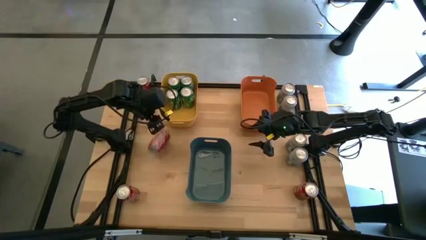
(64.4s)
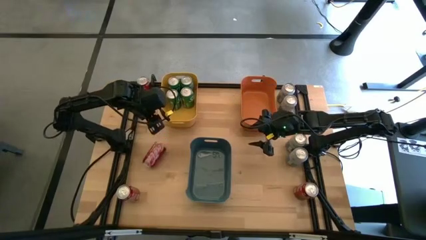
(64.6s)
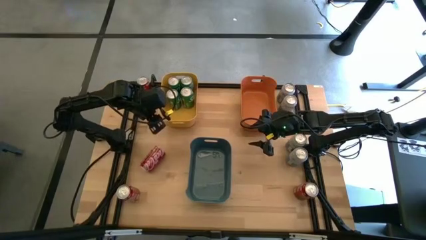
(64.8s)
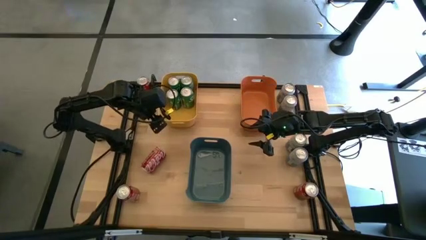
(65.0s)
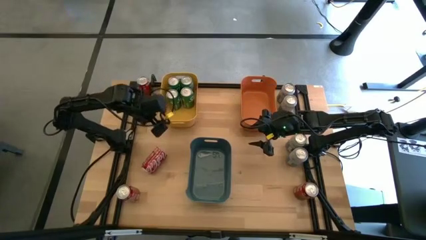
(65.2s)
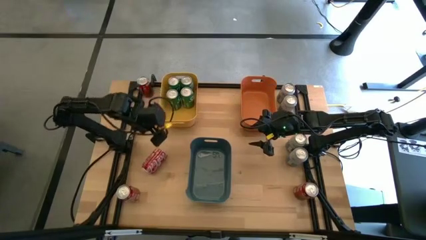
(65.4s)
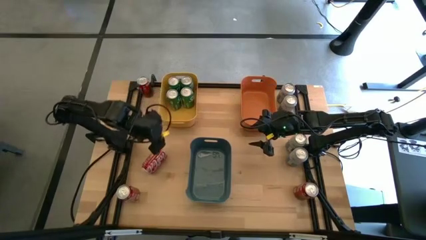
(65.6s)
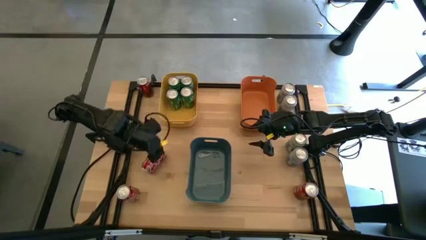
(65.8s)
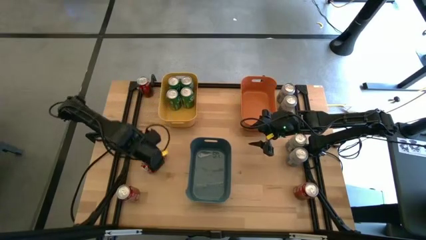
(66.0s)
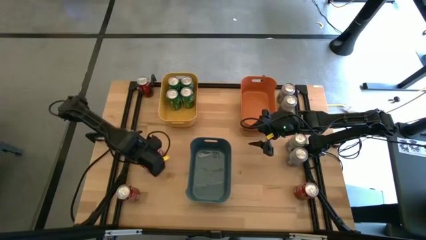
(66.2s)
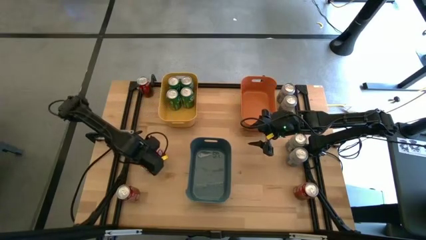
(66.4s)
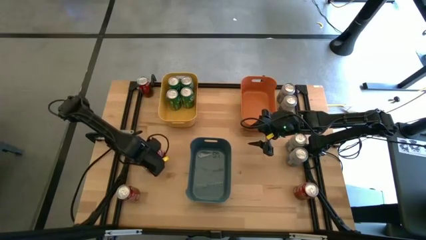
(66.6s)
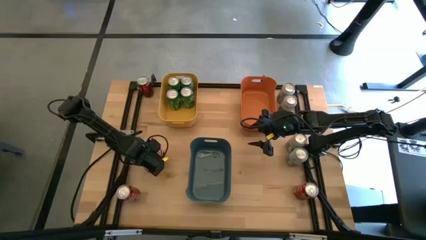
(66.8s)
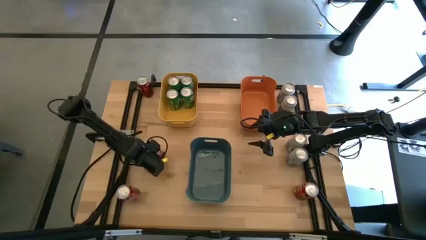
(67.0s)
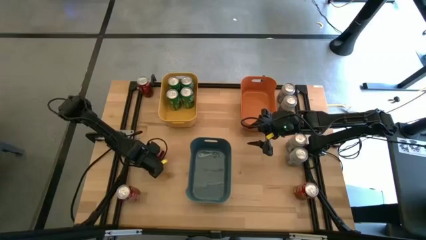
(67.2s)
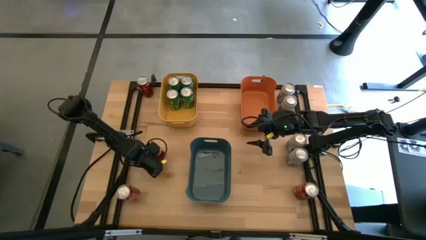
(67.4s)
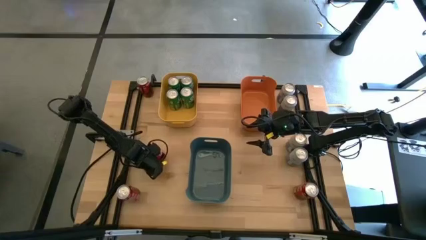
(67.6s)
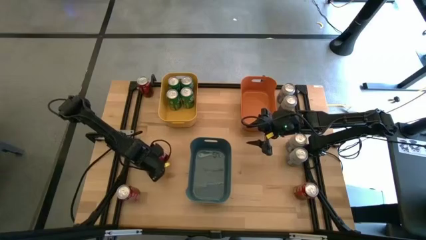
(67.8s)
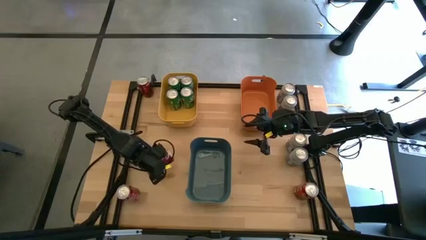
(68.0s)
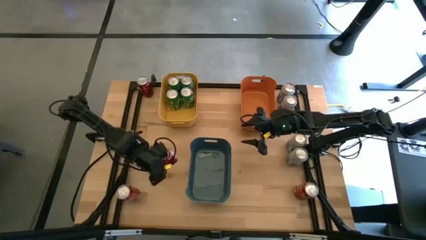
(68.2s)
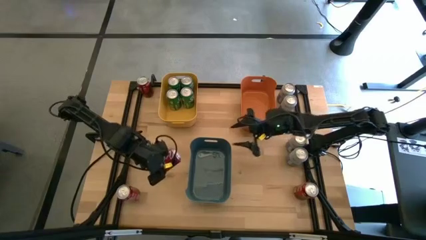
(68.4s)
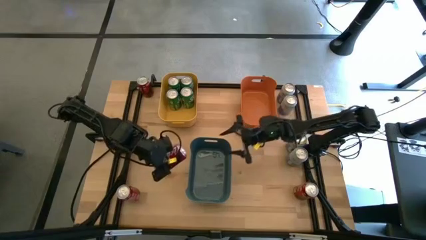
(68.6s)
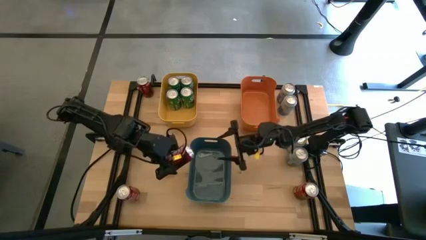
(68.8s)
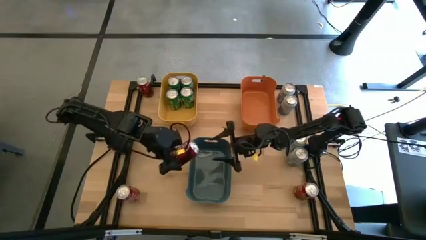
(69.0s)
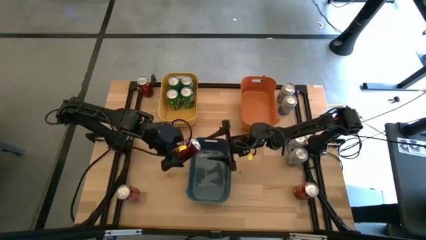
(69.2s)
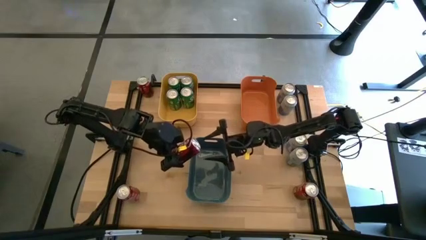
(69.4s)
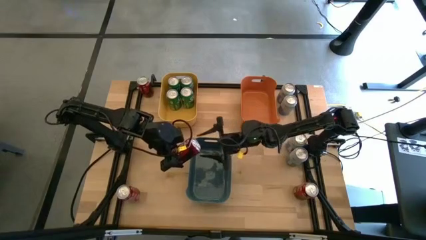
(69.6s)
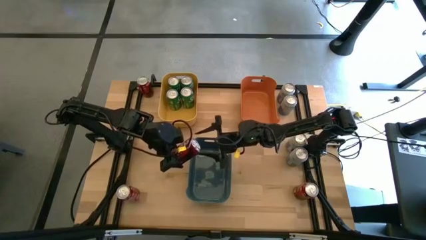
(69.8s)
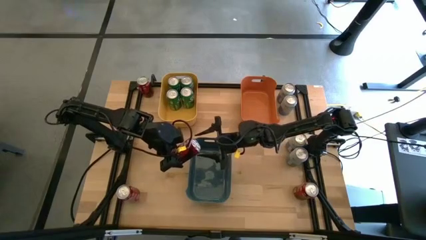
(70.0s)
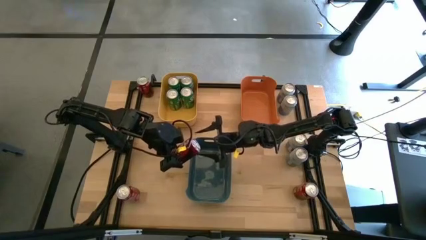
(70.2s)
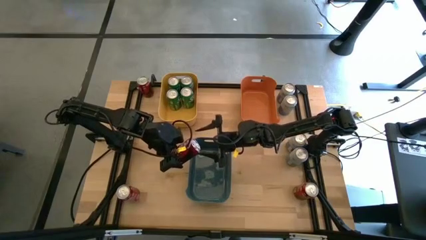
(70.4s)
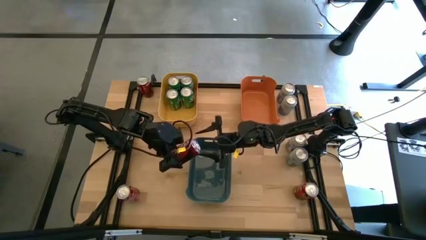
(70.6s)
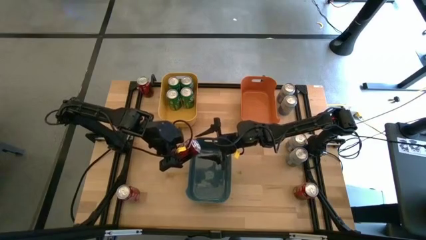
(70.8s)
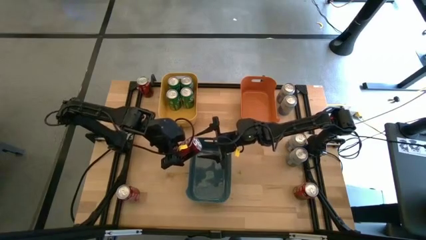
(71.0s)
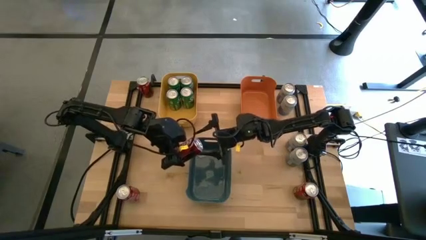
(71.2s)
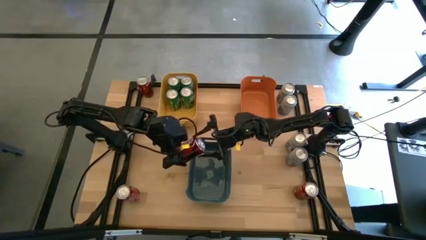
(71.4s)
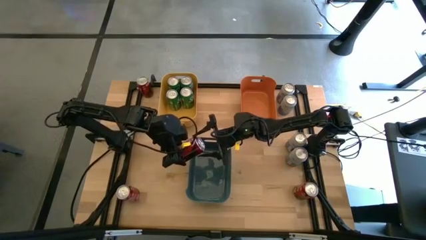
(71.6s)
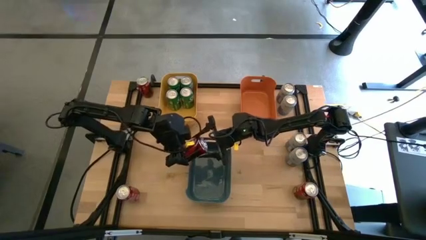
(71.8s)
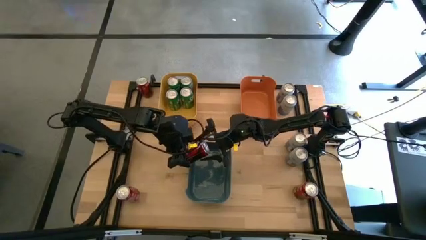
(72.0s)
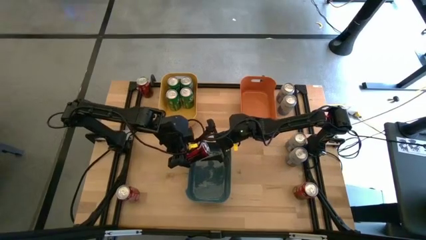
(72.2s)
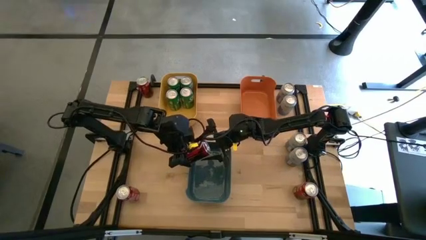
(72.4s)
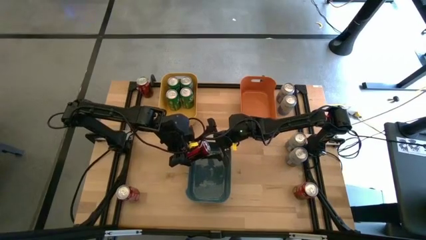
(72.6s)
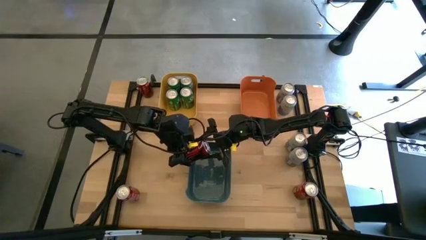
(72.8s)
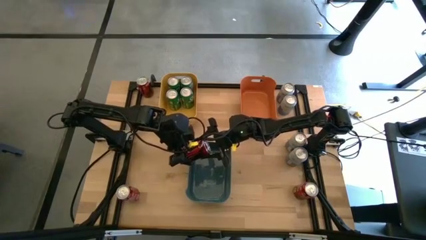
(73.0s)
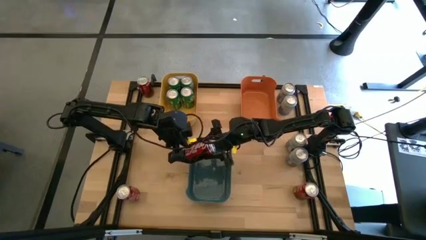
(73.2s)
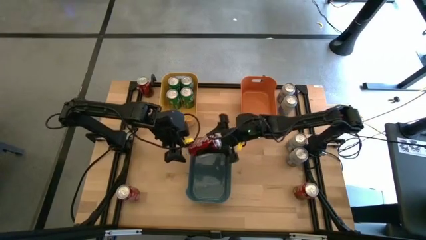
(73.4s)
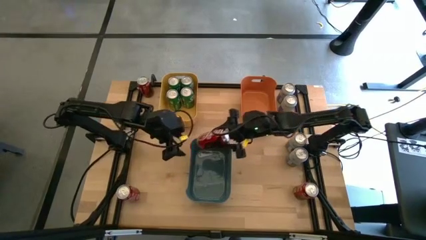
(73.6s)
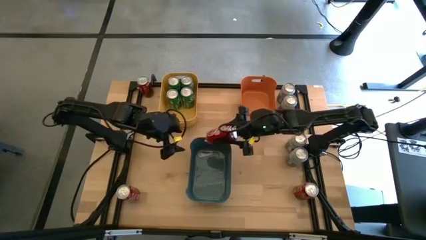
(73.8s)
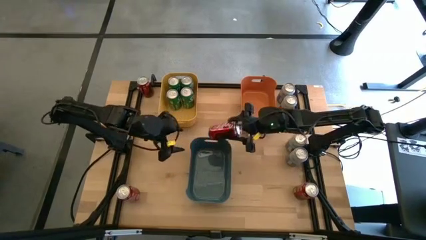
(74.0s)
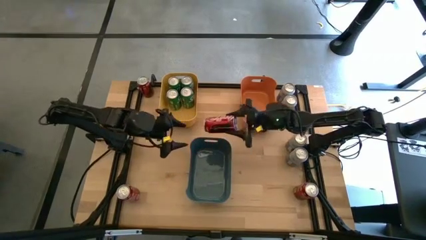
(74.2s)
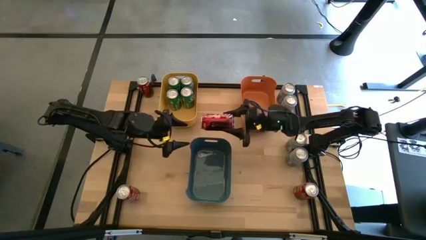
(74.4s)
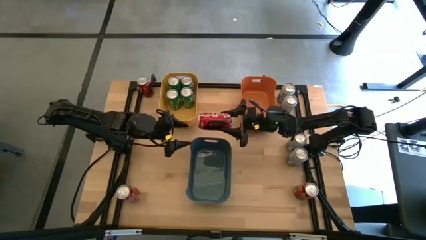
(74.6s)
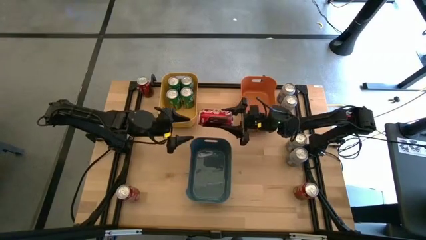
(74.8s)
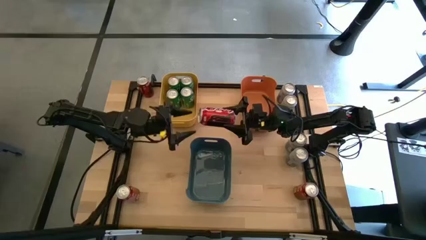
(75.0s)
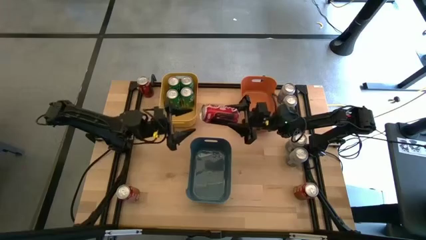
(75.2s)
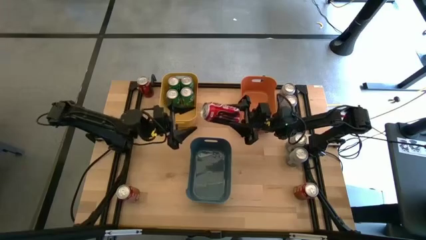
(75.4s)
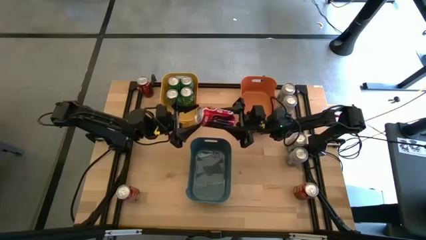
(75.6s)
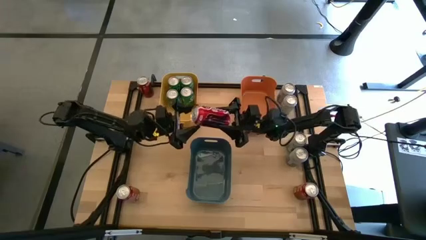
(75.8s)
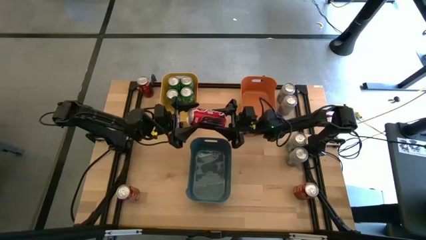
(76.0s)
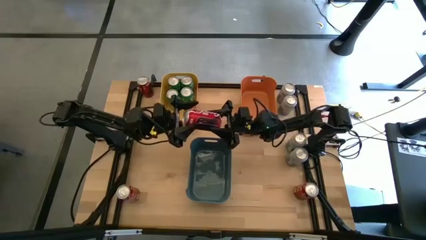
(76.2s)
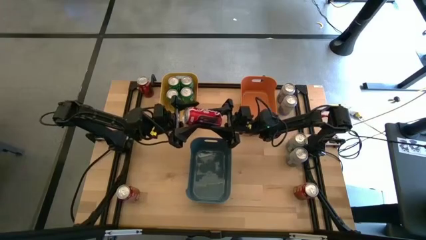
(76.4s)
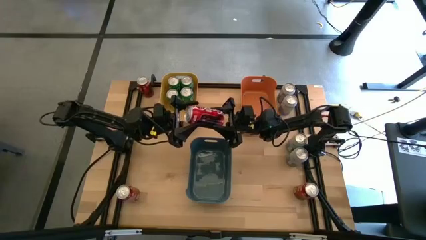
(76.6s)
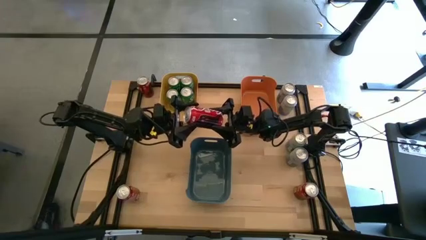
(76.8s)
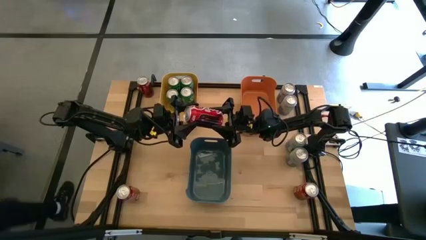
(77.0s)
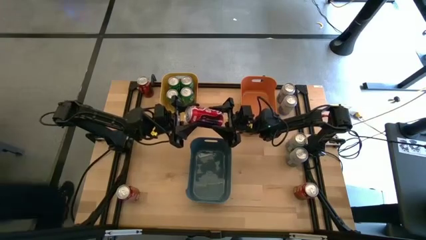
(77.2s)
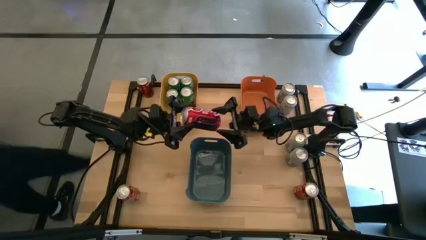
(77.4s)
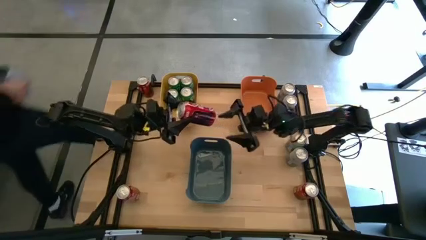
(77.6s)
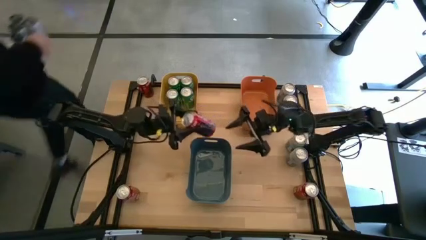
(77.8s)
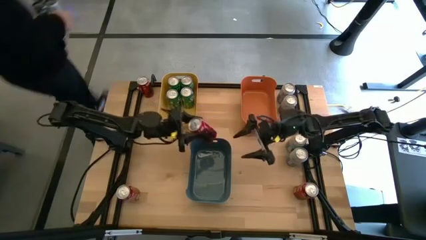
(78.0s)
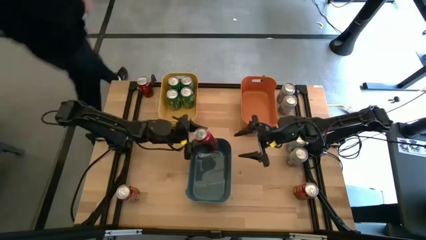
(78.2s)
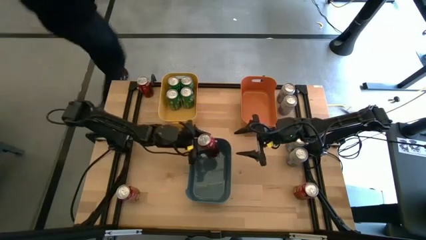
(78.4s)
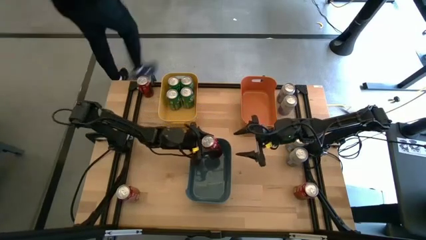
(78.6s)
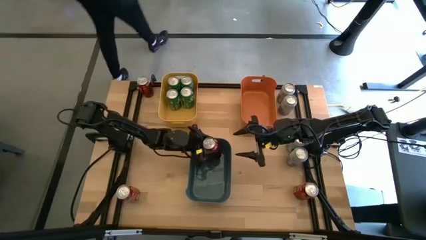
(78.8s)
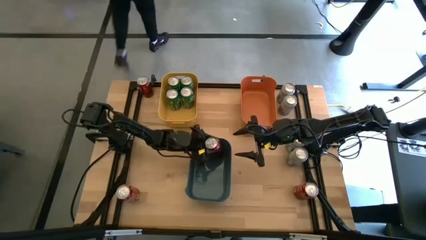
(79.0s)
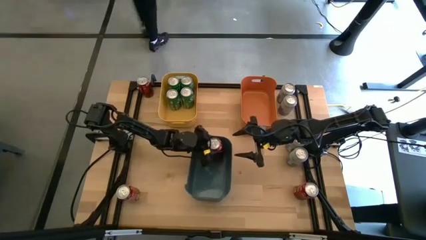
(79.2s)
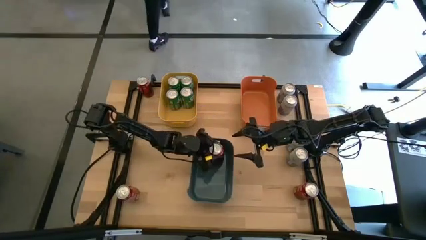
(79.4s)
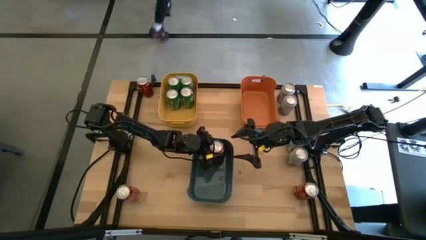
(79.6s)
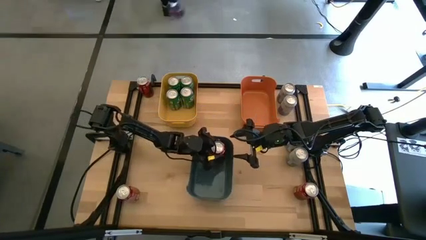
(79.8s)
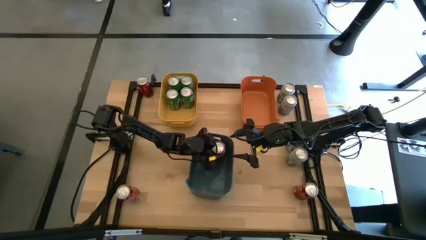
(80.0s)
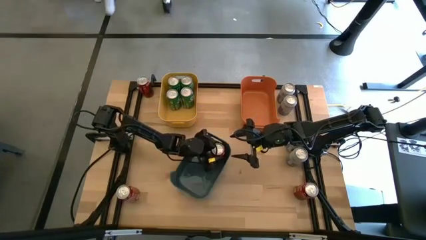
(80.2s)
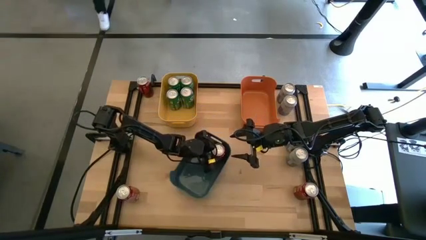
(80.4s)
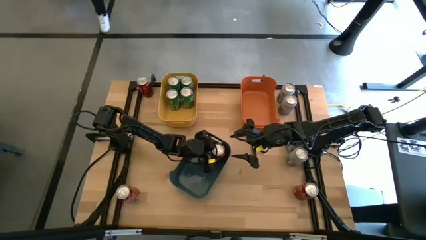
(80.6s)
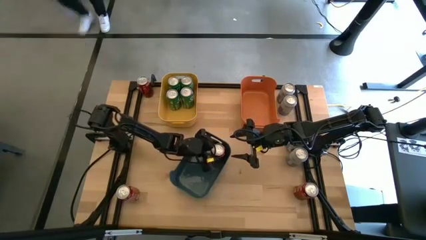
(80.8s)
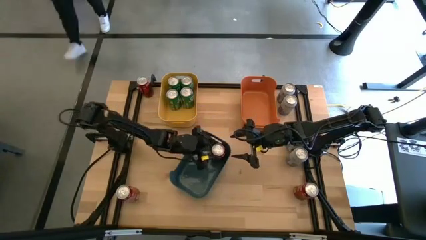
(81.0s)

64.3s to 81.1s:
Task: Sort soda cans
Put the red soda can into the blue bin
